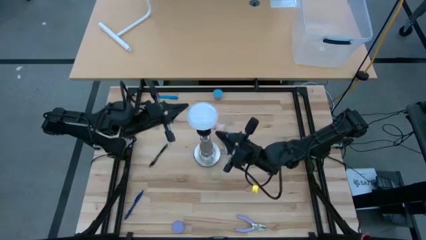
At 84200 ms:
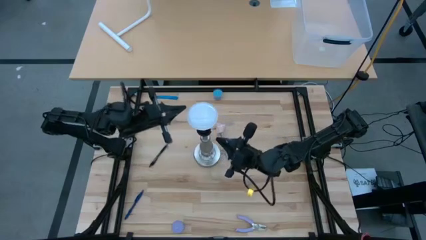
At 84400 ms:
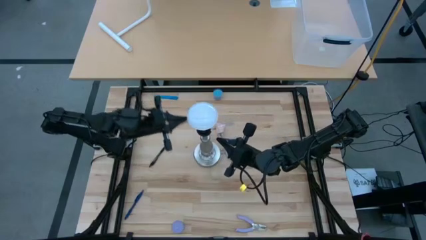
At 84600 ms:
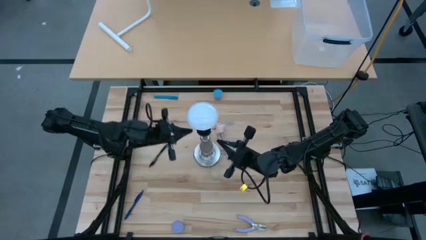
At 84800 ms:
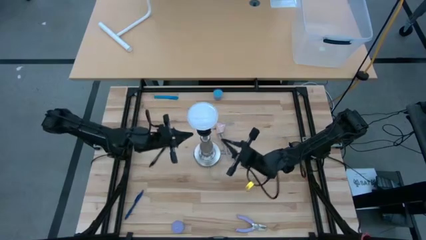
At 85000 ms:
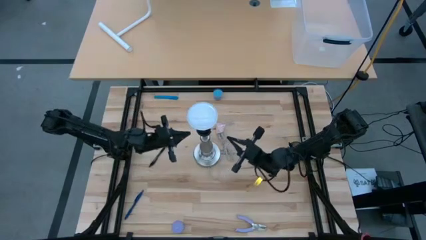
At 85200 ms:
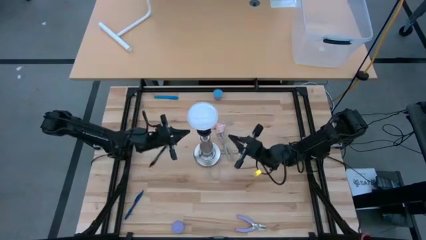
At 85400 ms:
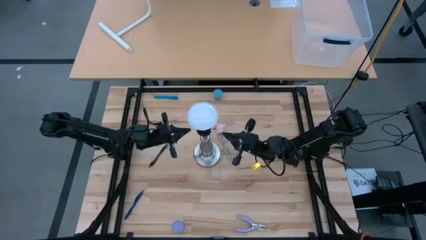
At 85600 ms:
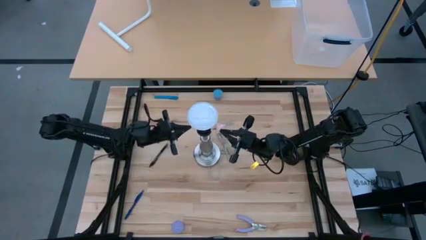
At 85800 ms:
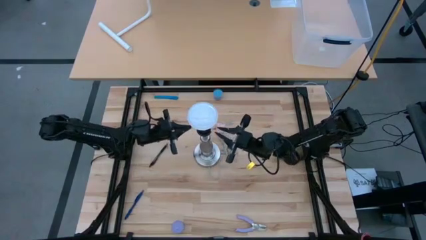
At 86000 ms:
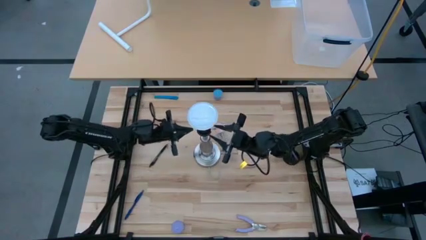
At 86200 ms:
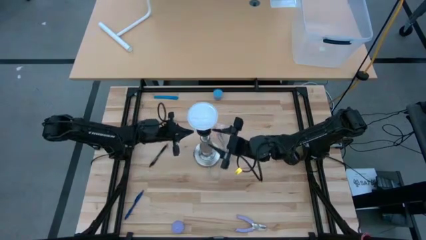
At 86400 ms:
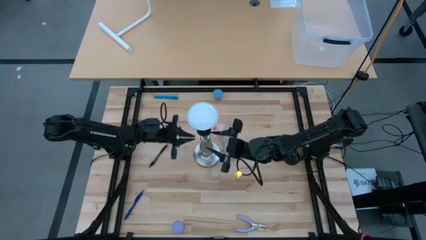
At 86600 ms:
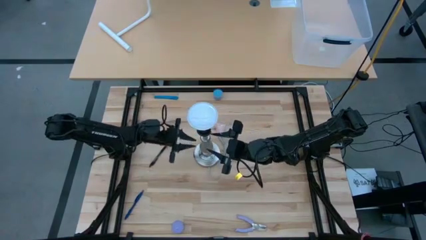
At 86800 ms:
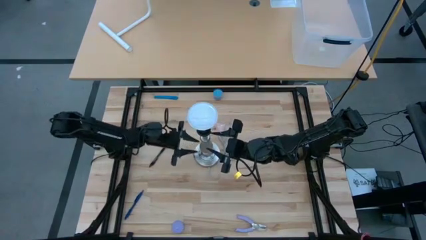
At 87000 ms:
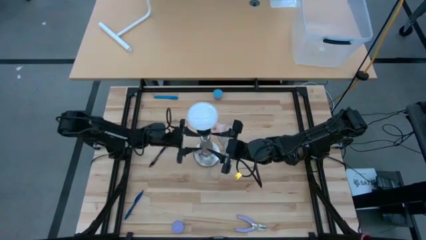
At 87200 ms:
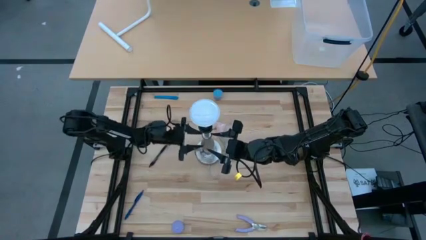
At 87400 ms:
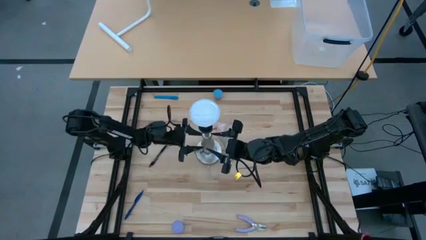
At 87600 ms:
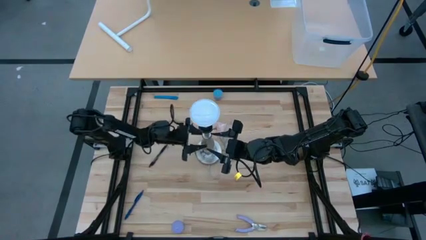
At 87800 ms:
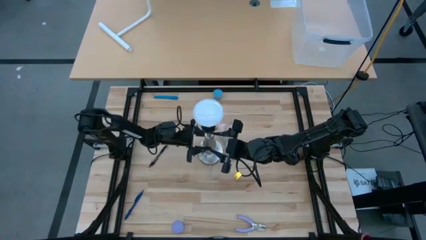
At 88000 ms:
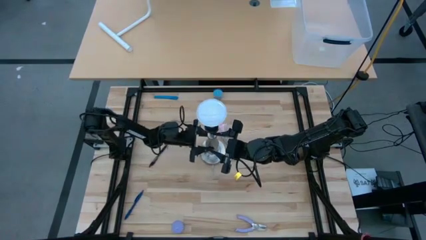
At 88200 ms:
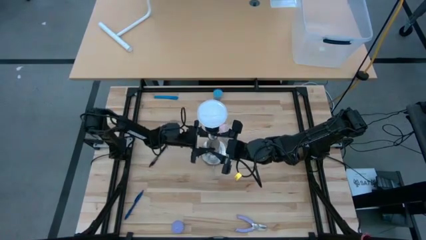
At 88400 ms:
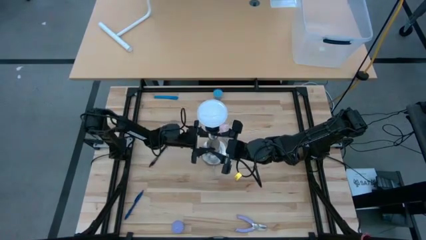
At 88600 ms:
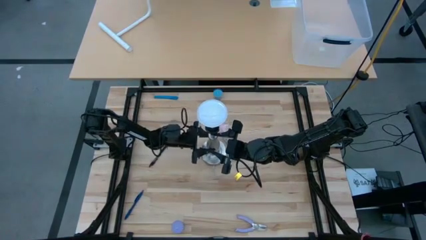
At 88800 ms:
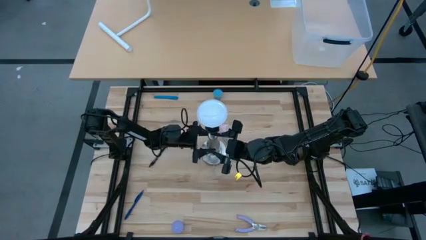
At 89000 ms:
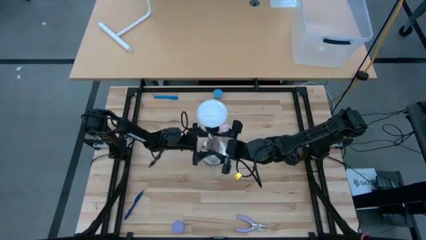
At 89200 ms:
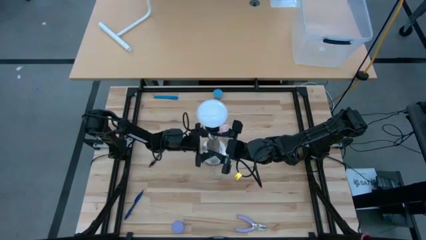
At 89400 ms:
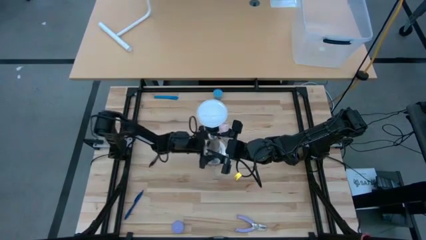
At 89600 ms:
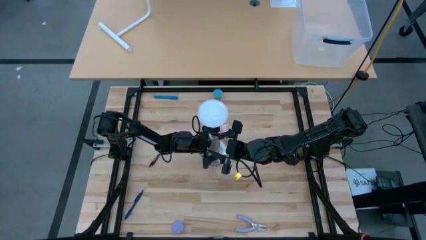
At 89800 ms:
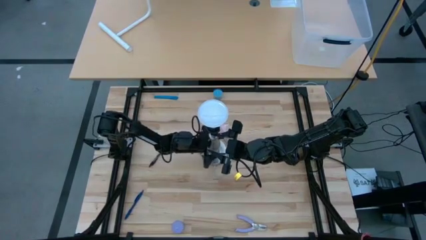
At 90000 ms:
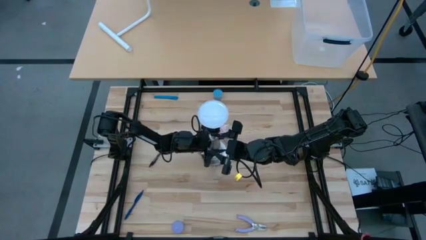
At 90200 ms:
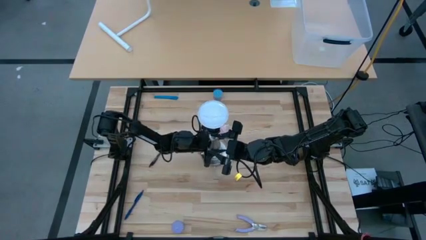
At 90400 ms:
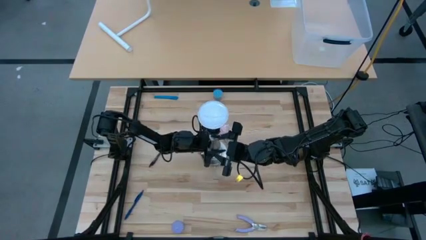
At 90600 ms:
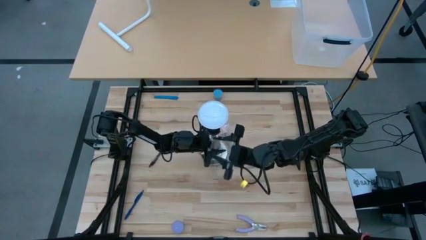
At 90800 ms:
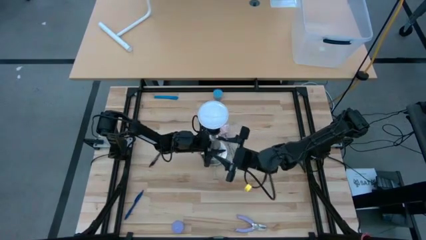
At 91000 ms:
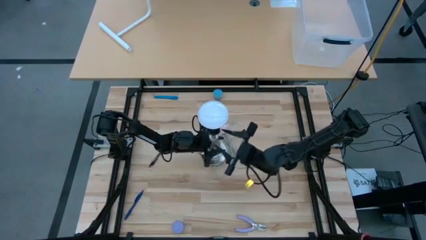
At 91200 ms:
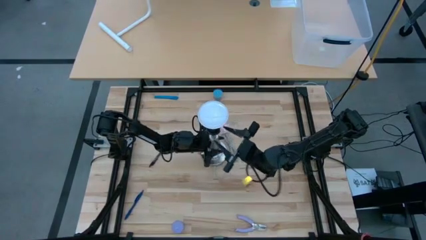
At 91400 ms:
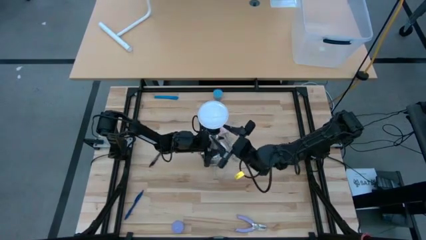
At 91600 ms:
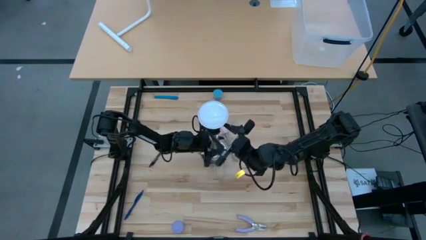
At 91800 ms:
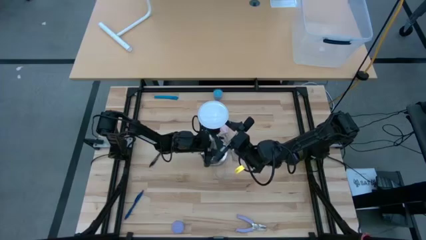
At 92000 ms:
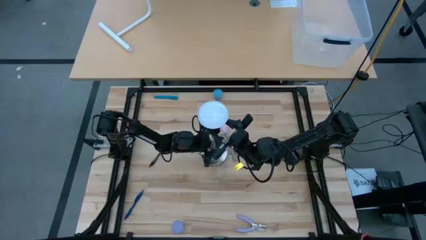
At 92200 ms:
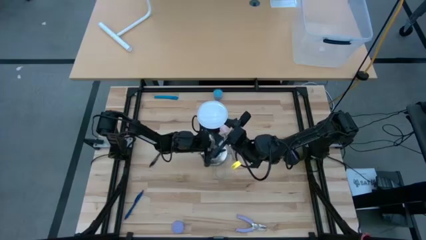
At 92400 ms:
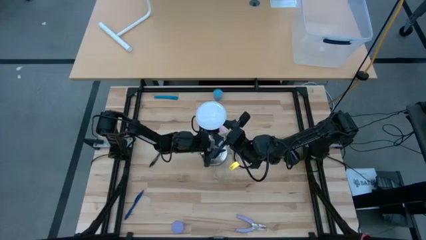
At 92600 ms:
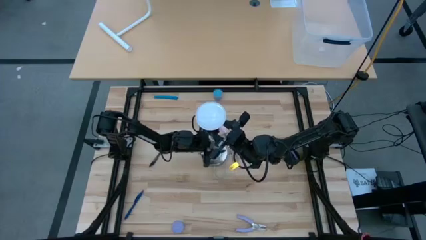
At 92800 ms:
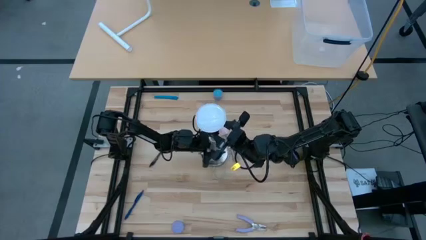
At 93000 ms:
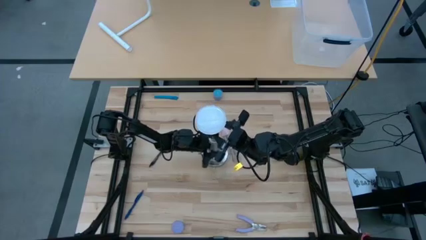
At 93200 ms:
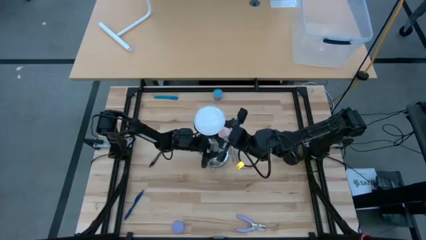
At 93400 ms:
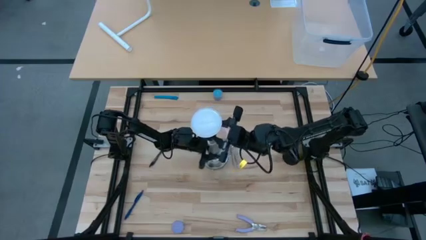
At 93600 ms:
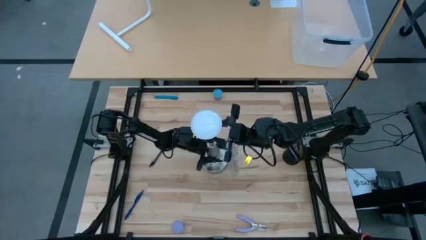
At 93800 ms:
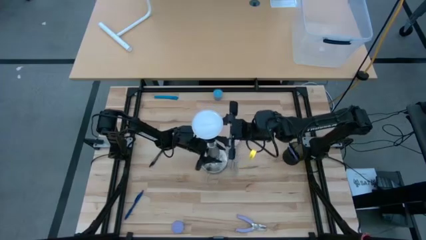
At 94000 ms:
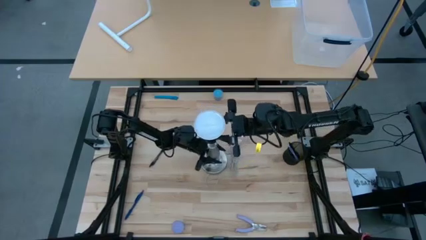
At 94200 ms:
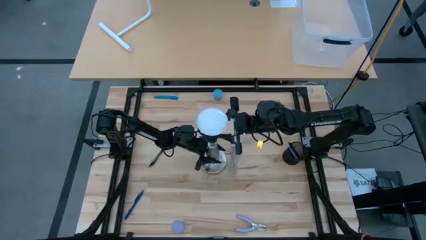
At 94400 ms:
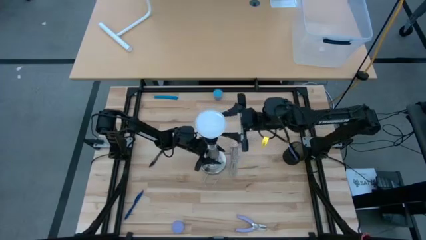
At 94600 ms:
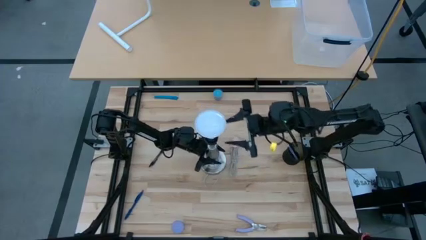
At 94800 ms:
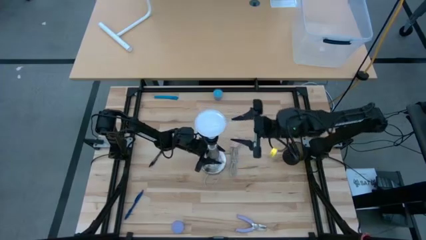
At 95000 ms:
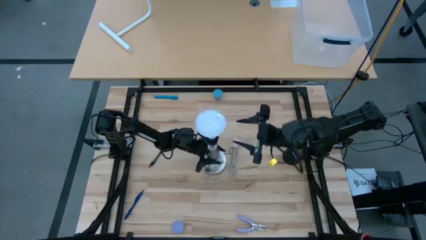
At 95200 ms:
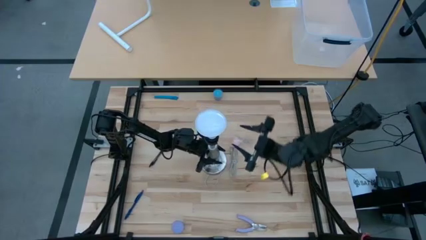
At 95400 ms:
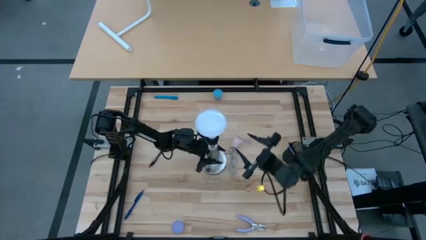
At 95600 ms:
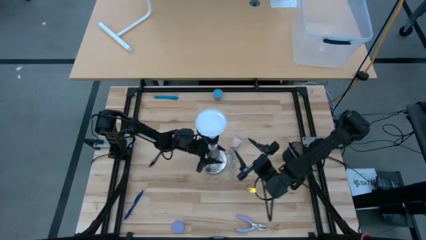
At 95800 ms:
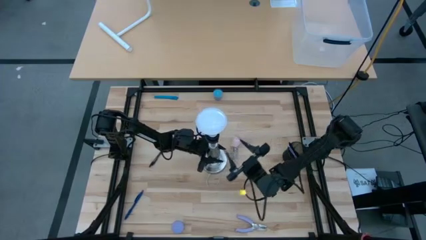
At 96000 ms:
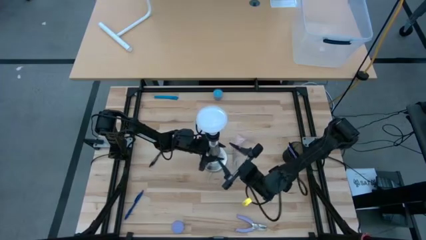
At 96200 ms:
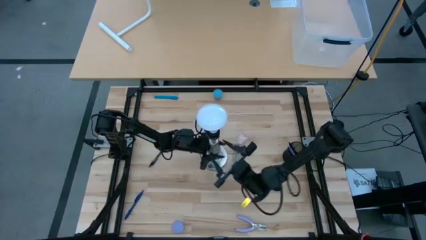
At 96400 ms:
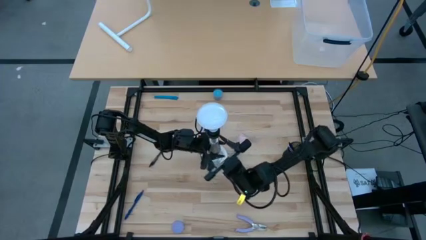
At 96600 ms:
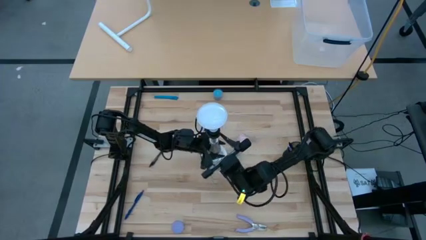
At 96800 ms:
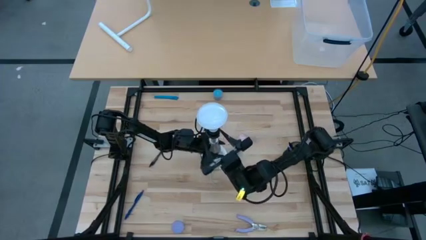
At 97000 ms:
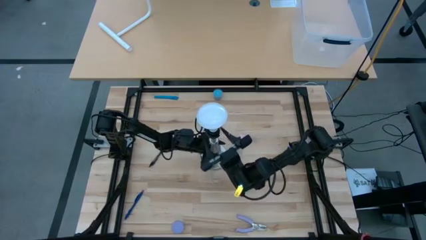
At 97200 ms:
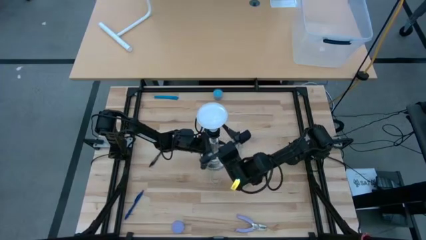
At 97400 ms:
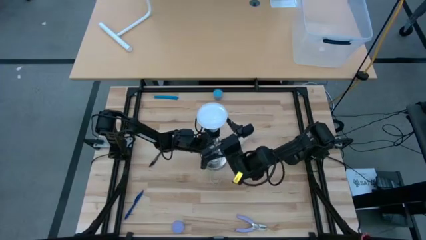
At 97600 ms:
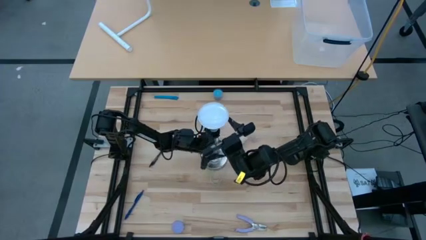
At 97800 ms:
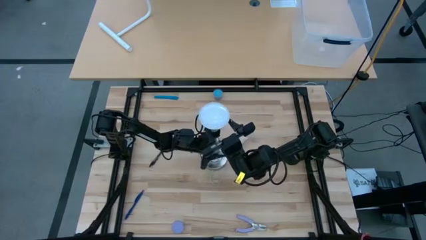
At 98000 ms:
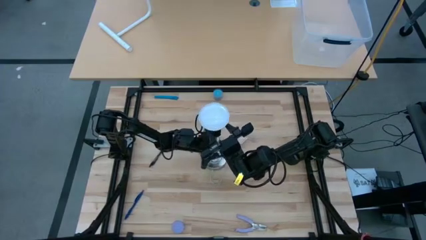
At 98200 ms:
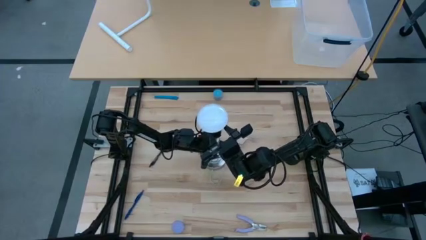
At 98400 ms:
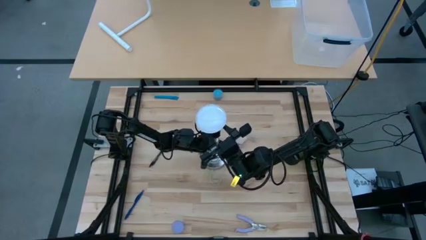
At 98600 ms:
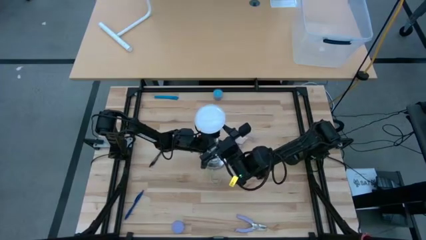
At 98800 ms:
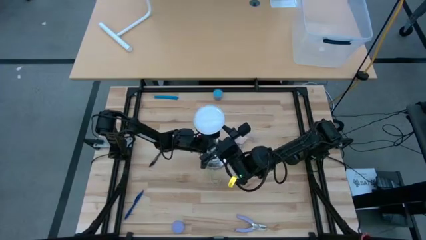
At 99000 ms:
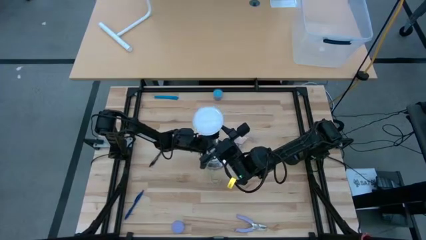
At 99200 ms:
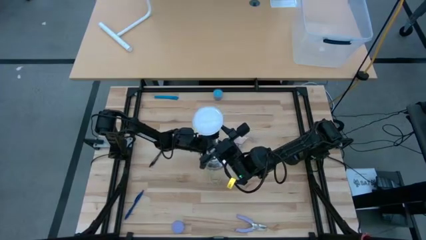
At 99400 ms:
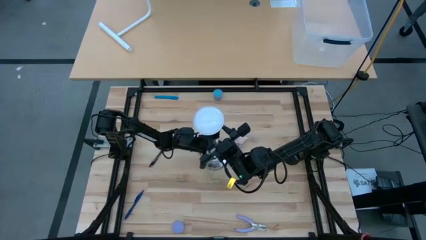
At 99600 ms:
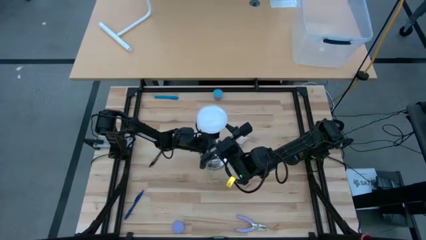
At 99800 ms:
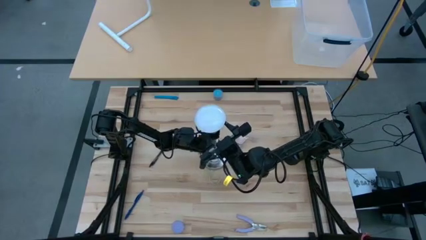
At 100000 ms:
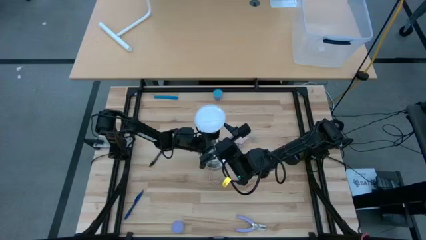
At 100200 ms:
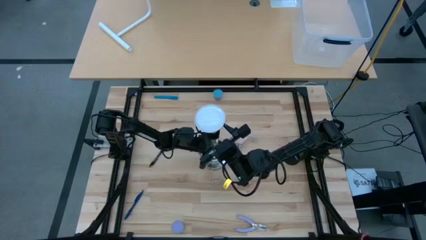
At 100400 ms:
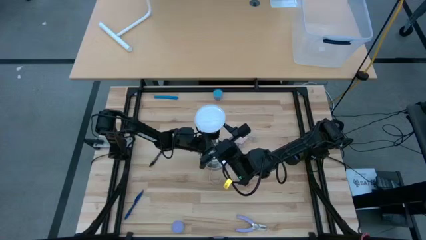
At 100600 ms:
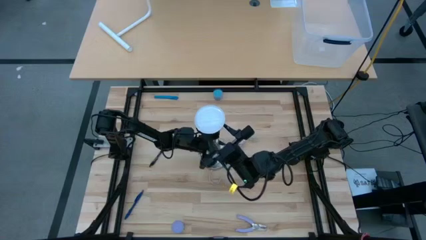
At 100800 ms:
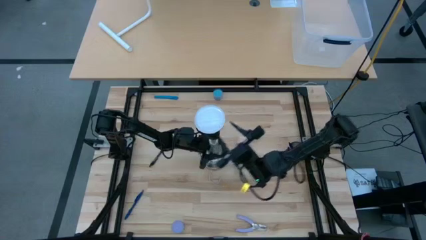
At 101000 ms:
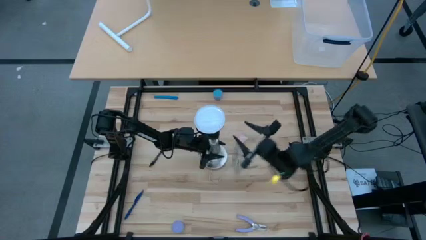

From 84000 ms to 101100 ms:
Task: Screw lightbulb
Remove the lightbulb from the lamp
